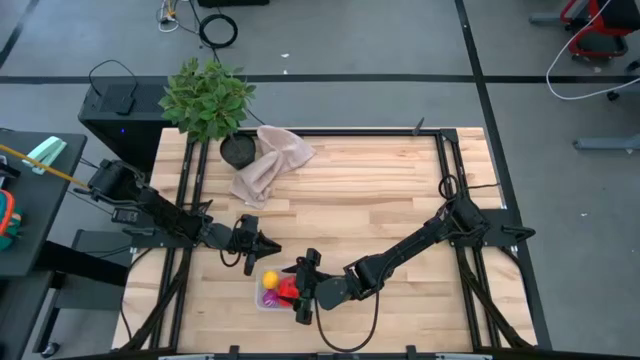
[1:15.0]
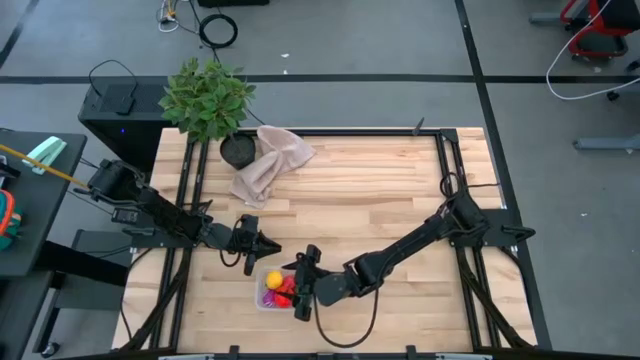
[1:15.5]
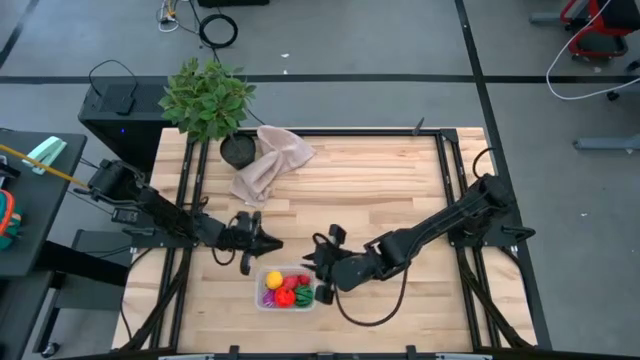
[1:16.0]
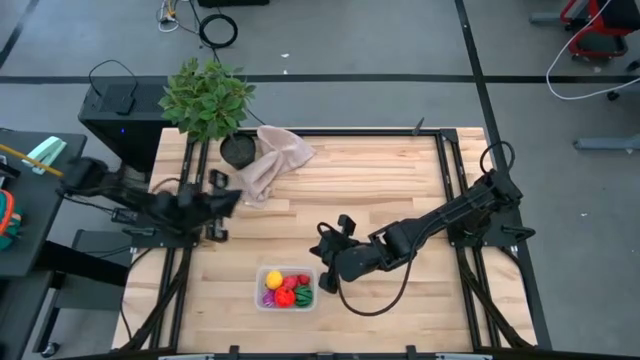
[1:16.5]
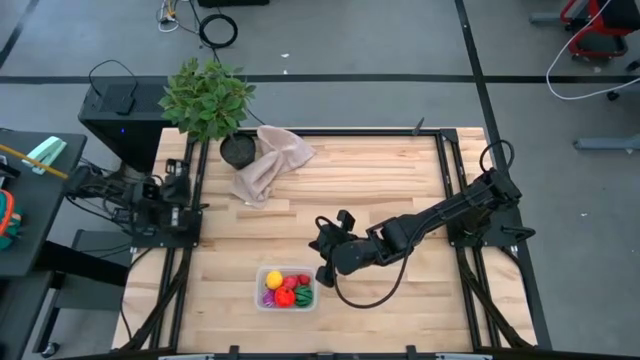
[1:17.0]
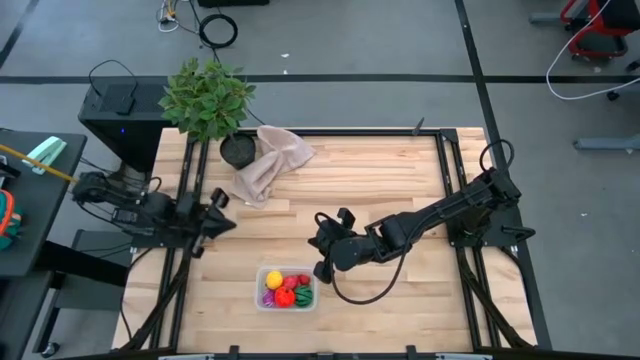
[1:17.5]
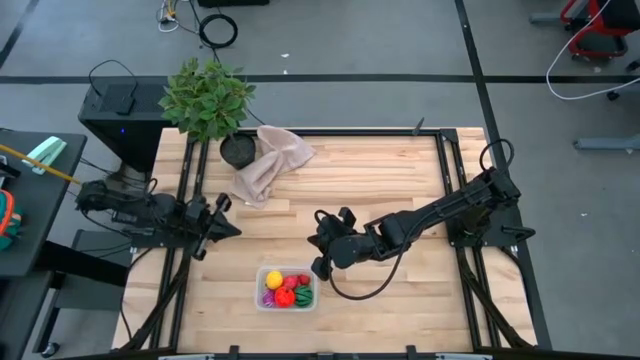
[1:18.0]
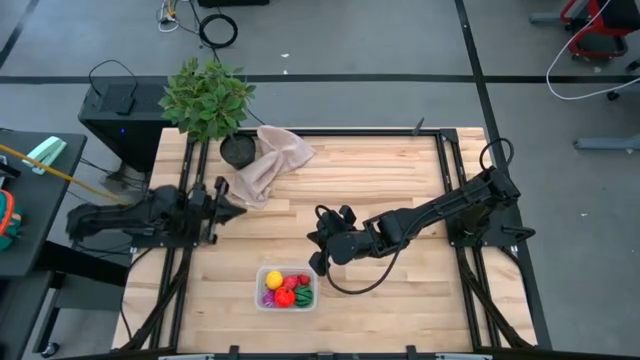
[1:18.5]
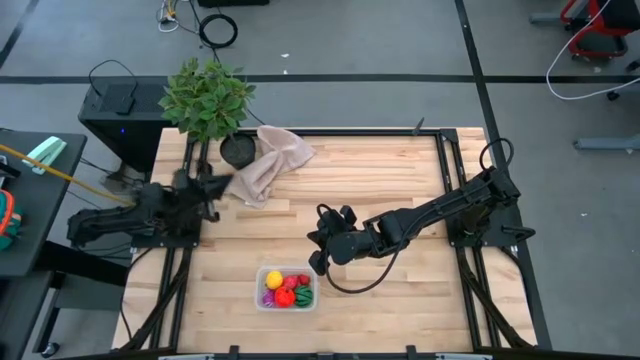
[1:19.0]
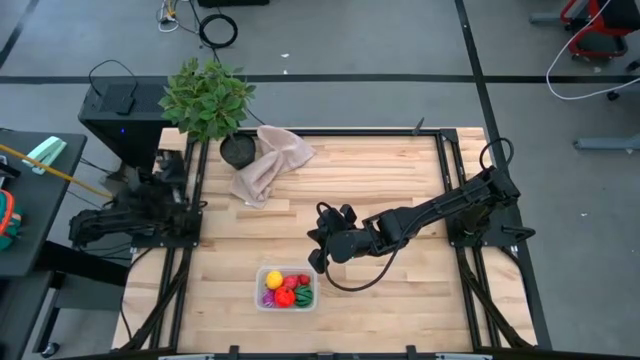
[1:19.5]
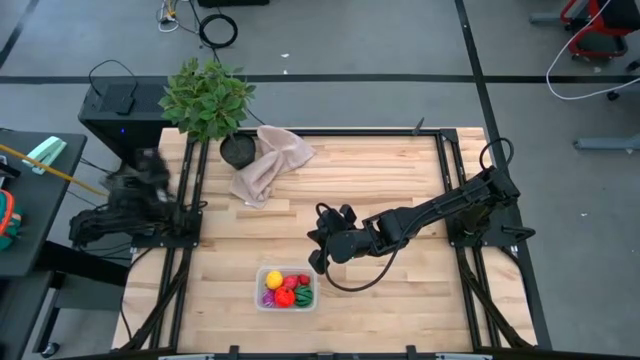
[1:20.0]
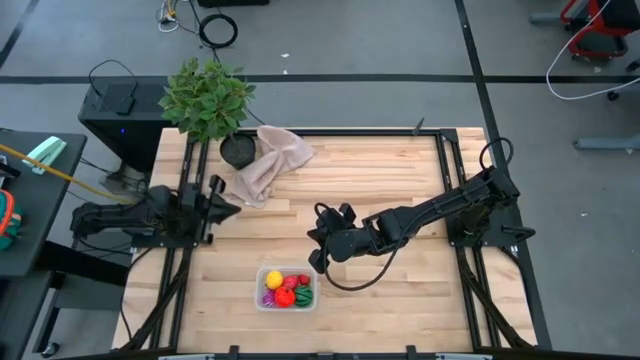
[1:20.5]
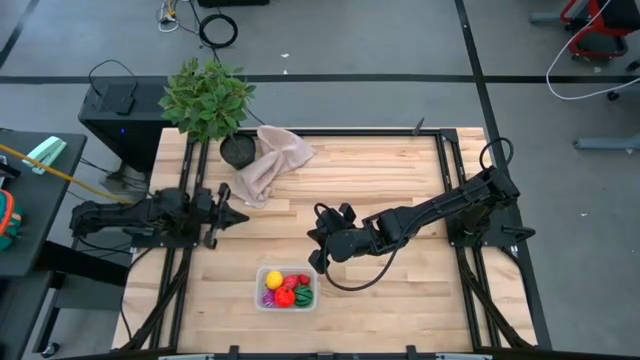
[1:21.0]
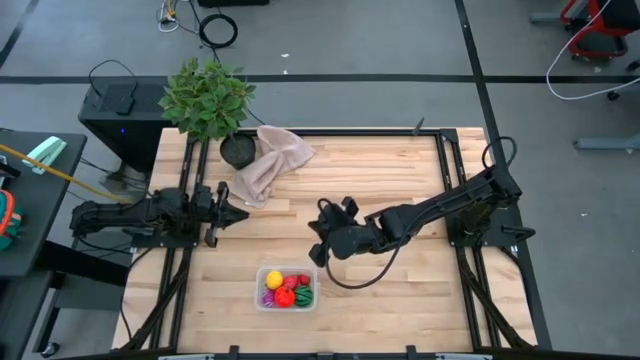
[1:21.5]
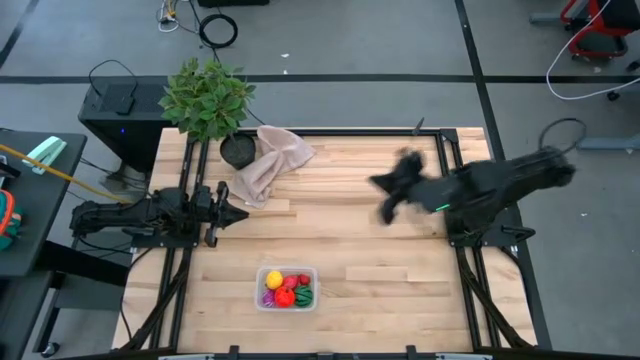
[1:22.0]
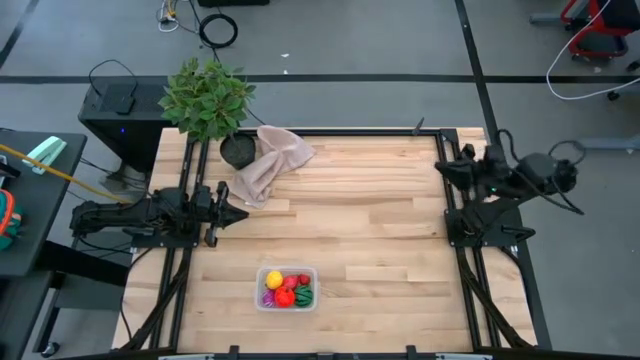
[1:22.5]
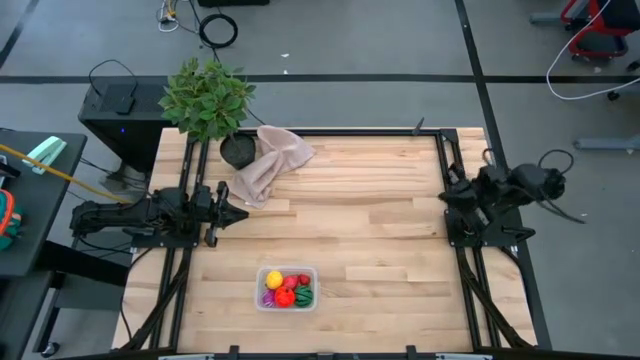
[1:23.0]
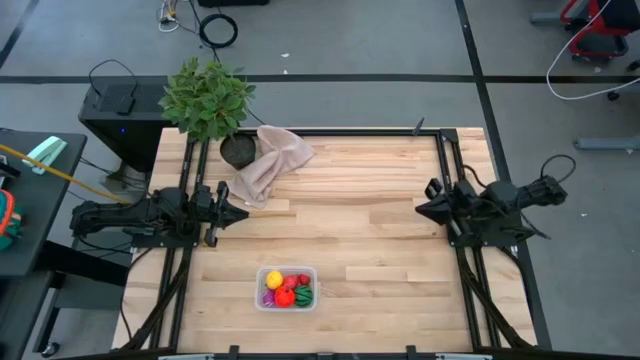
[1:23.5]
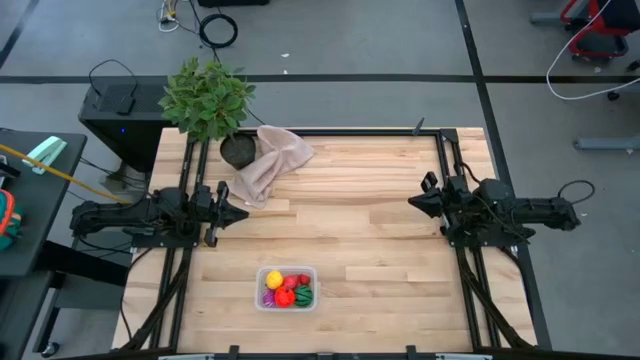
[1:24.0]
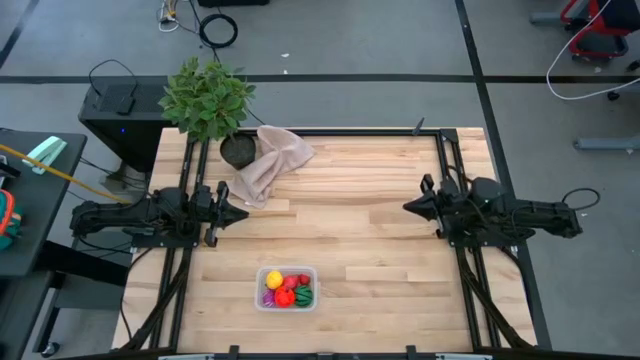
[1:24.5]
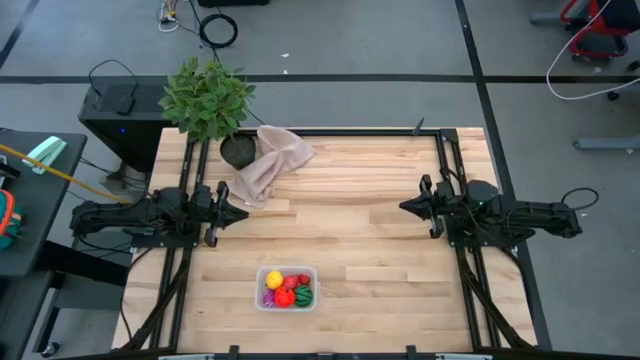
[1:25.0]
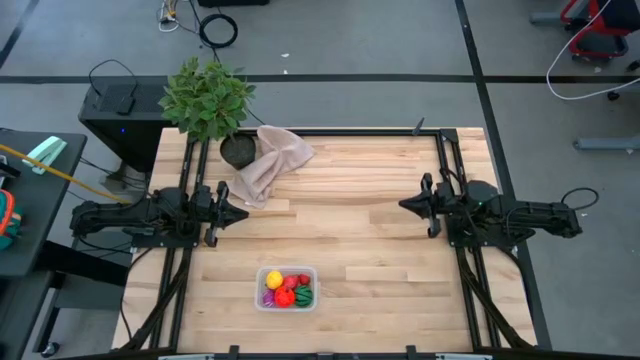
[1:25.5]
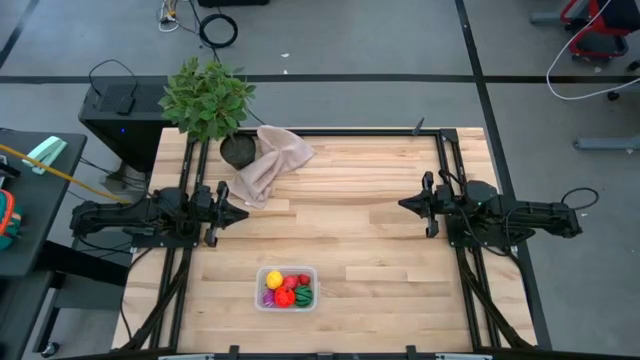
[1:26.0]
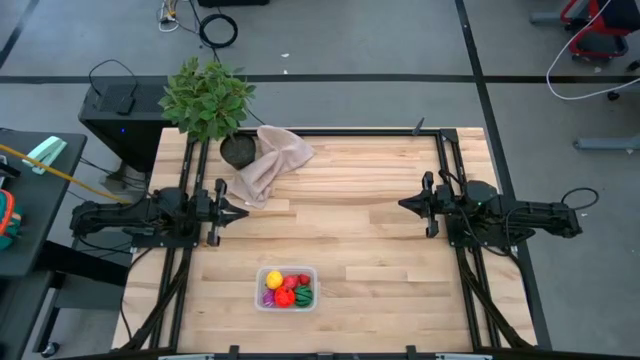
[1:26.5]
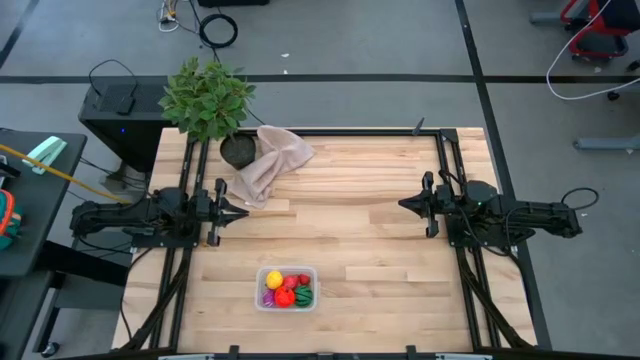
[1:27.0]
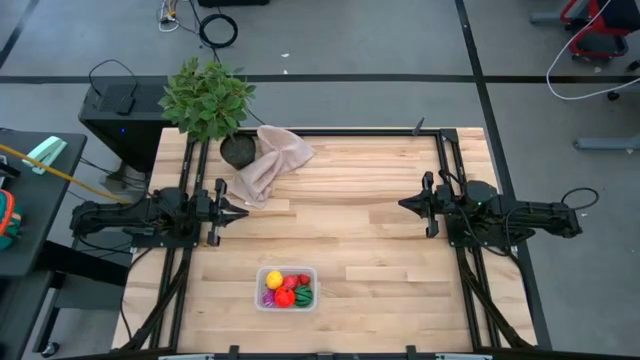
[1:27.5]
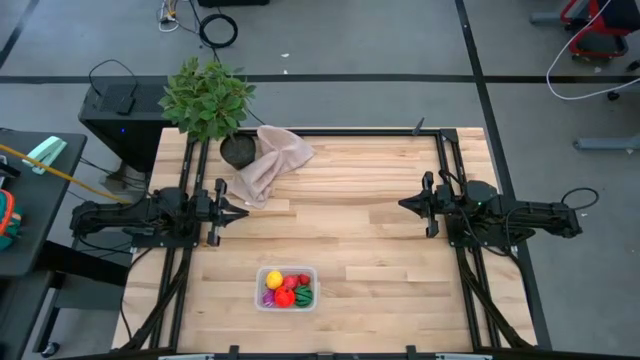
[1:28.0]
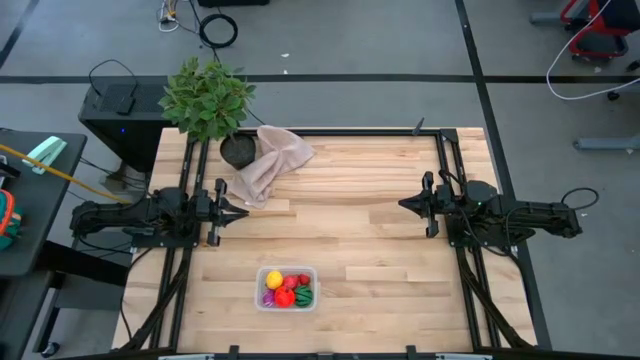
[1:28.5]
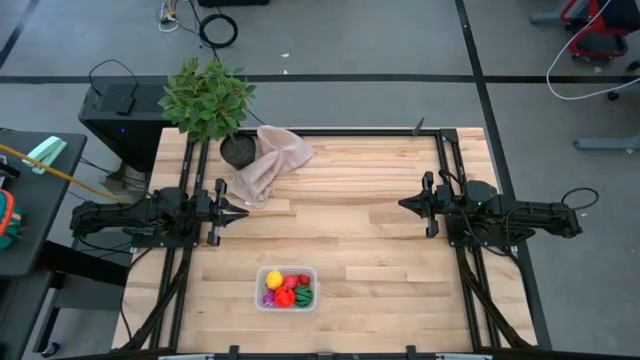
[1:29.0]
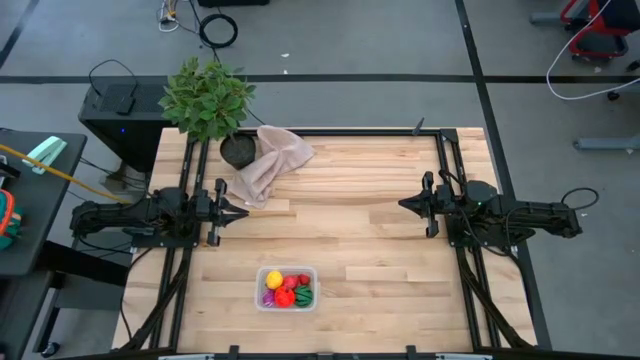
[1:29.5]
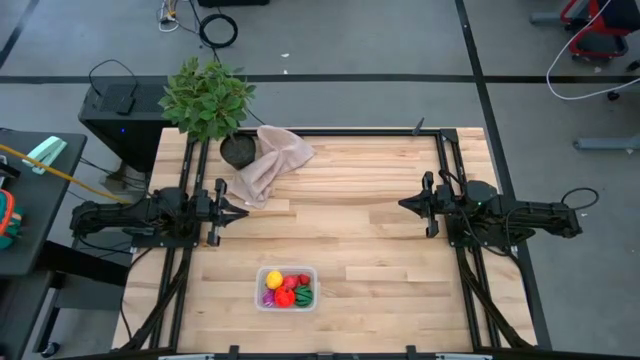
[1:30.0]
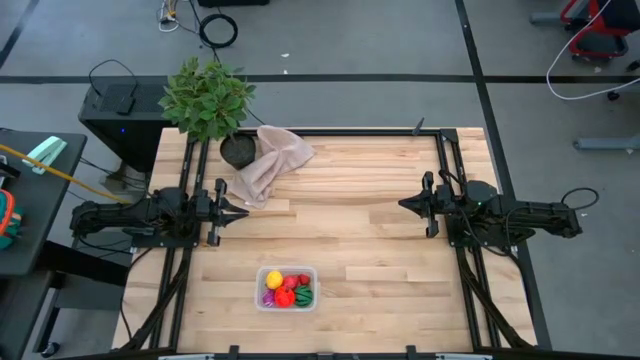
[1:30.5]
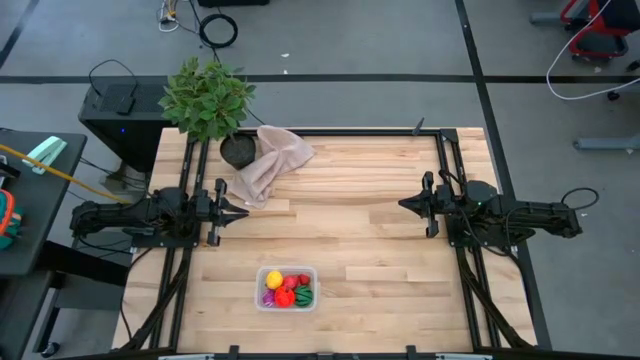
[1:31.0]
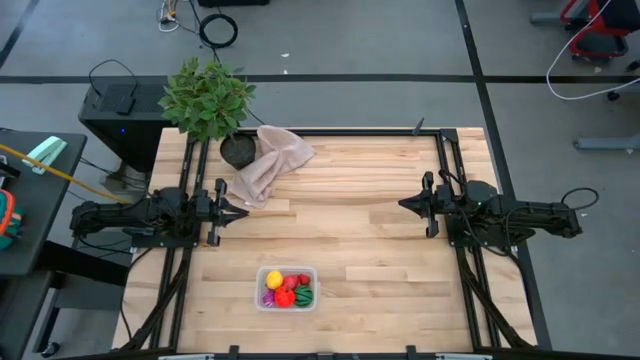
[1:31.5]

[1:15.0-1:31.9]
Task: Pick and placing Produce into tupperware
Return to Home Position

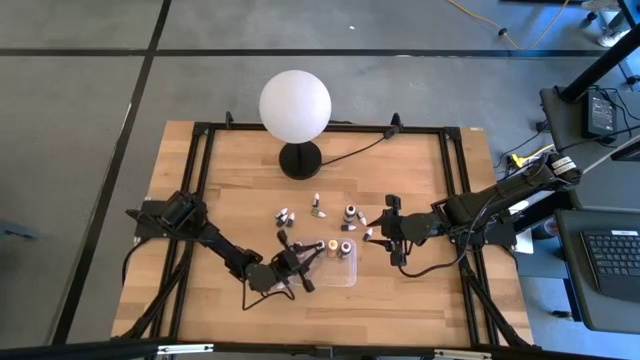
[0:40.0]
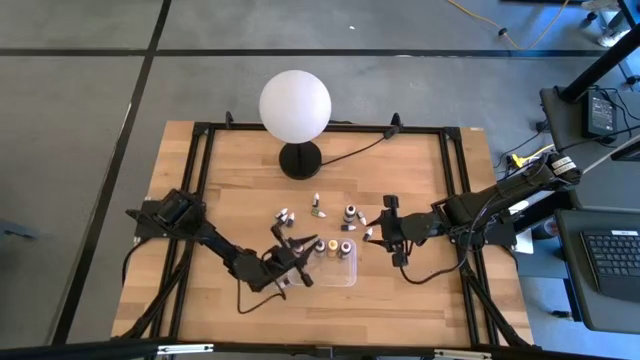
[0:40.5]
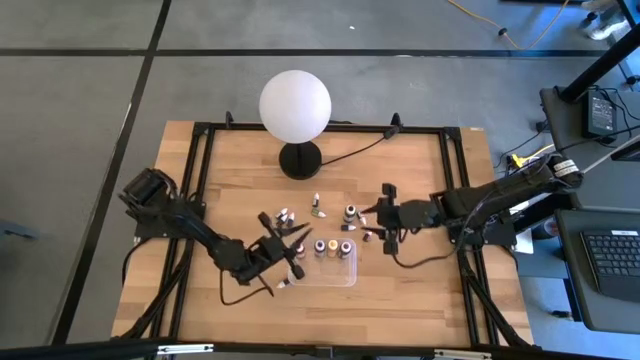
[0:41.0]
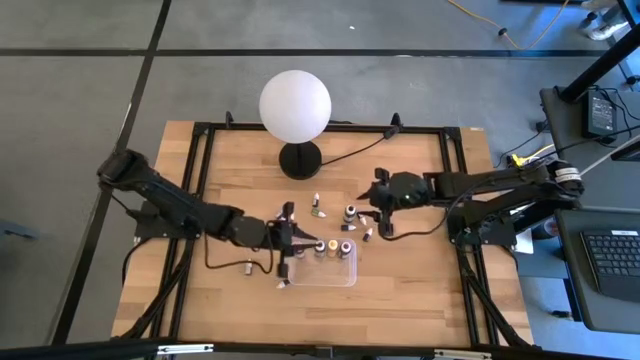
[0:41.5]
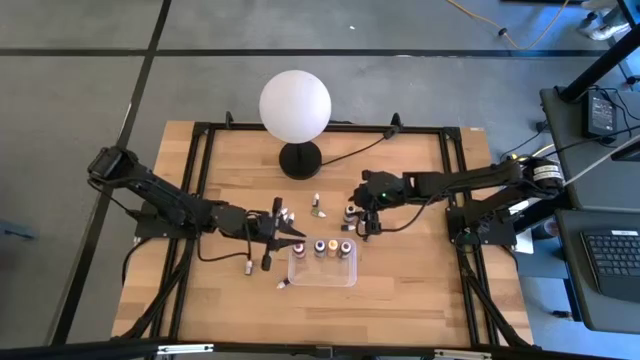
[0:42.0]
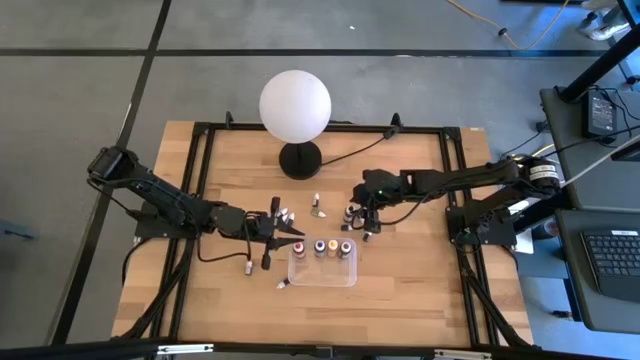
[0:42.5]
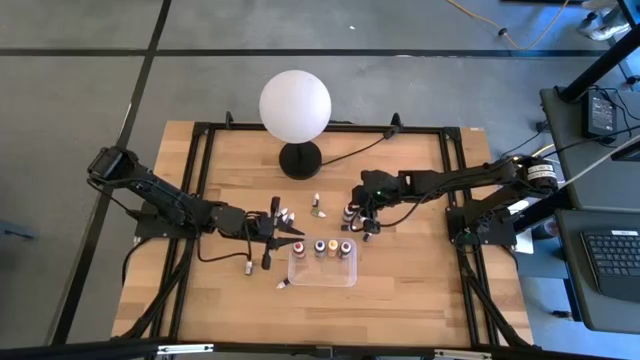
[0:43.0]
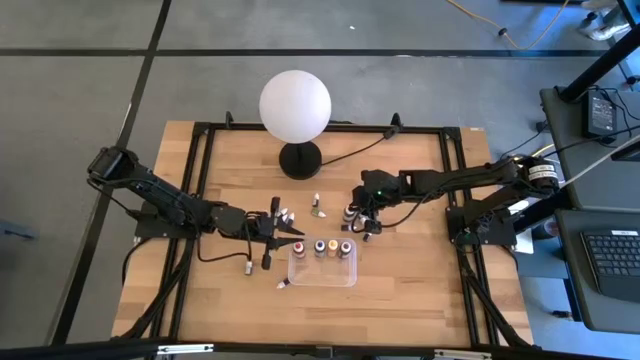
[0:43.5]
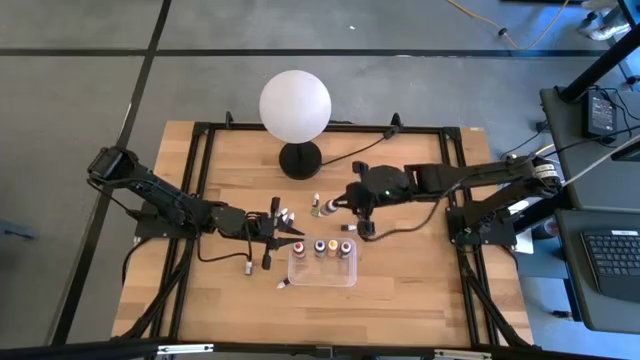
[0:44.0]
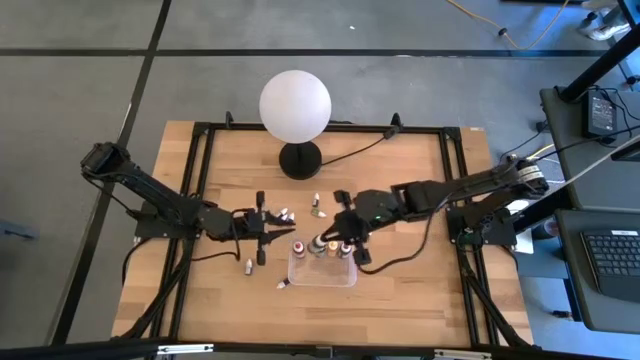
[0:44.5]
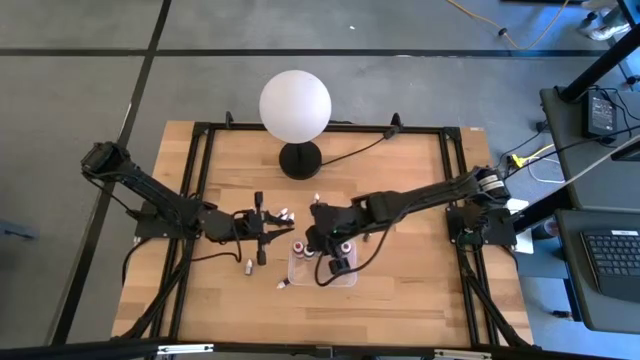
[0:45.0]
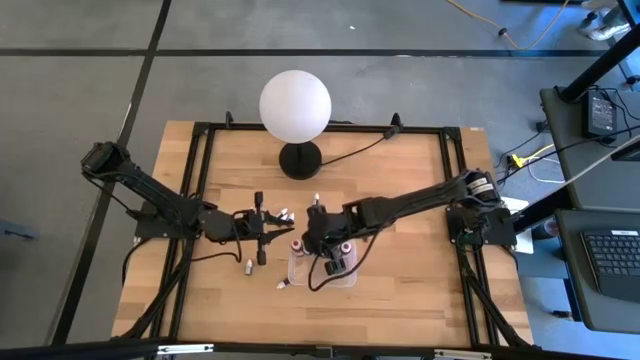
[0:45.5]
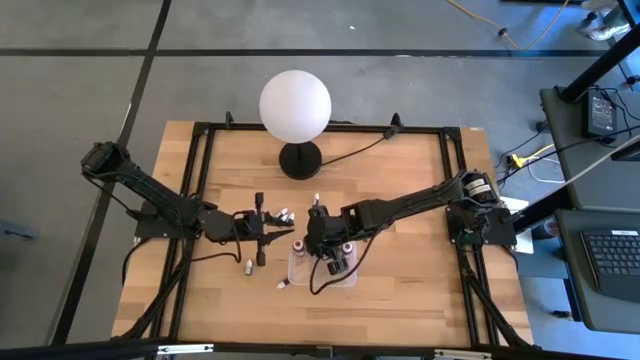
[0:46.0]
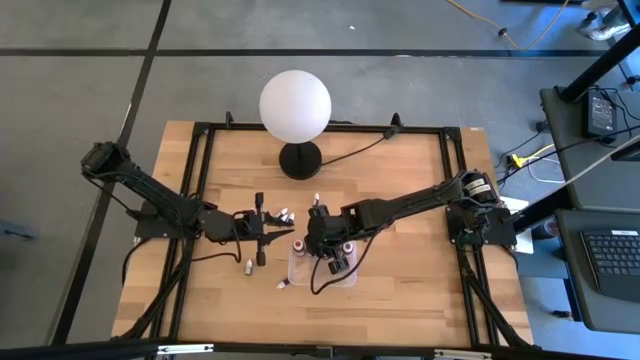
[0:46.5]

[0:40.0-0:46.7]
Task: Pick & Place food coloring
Put the large black food coloring bottle into the transparent bin
